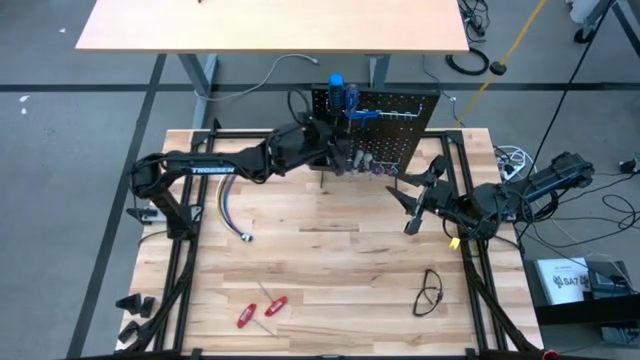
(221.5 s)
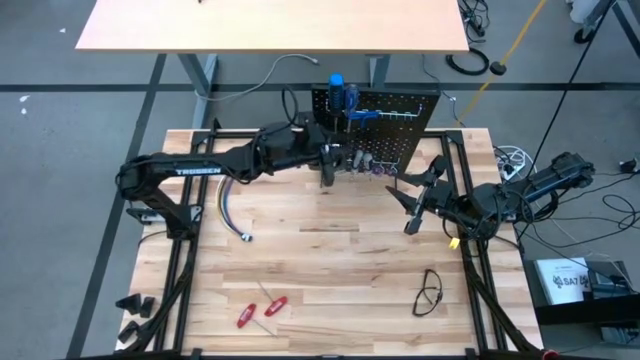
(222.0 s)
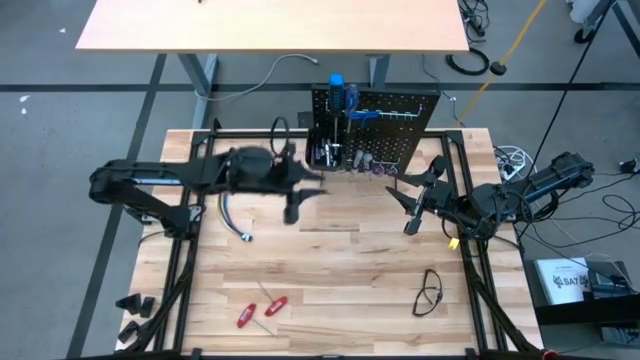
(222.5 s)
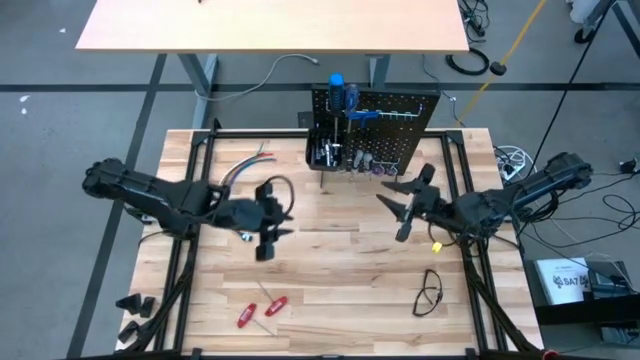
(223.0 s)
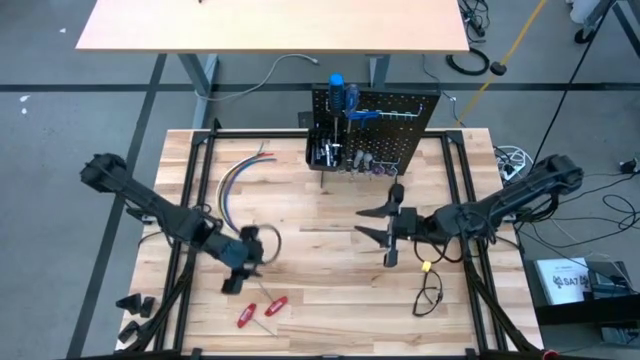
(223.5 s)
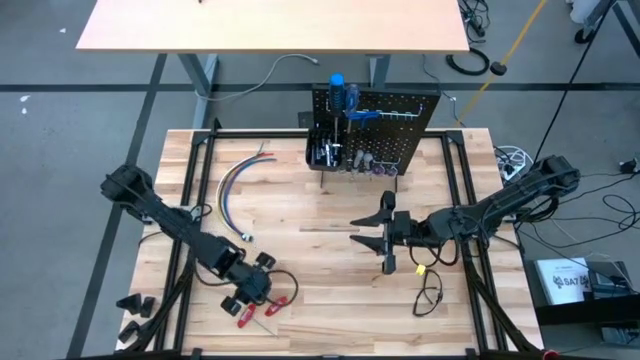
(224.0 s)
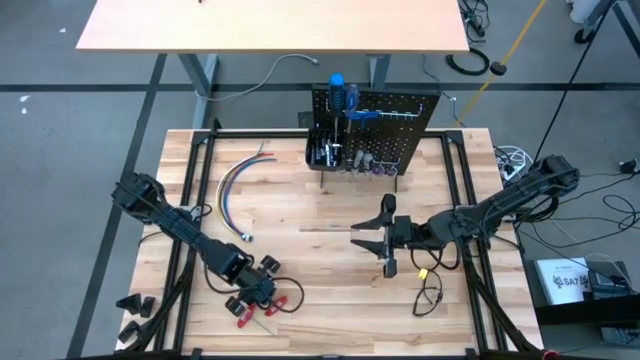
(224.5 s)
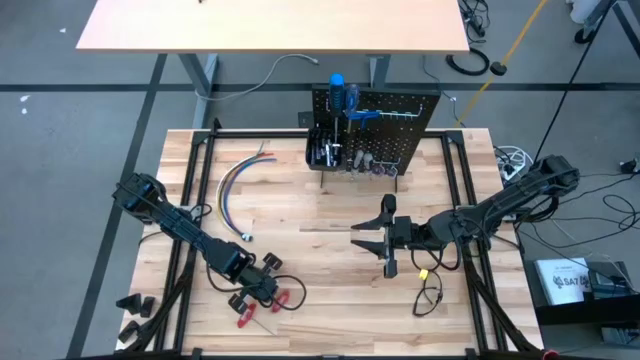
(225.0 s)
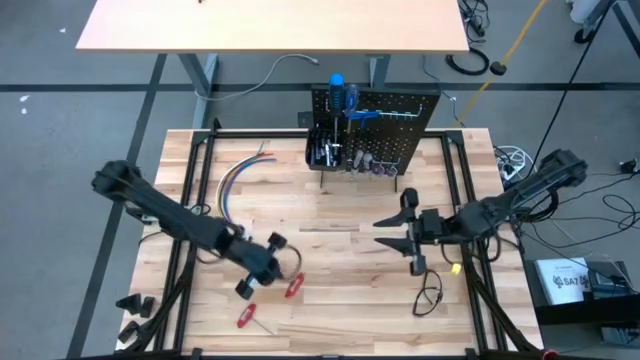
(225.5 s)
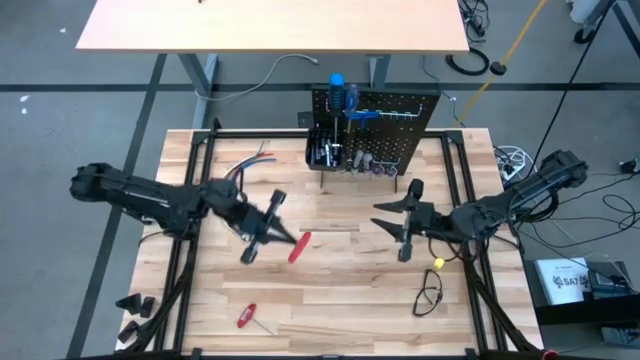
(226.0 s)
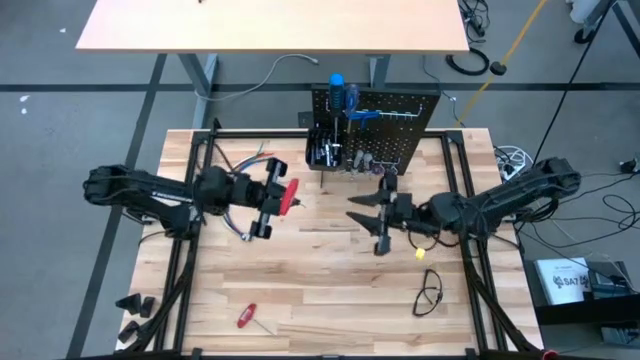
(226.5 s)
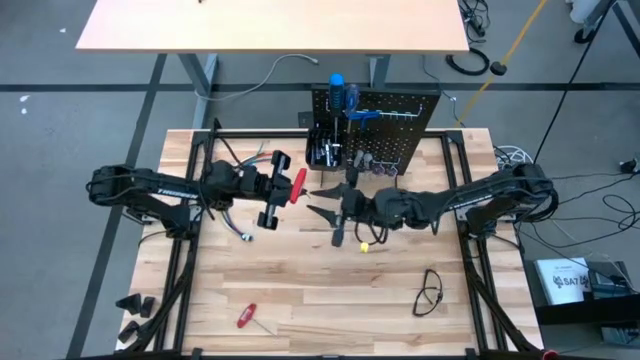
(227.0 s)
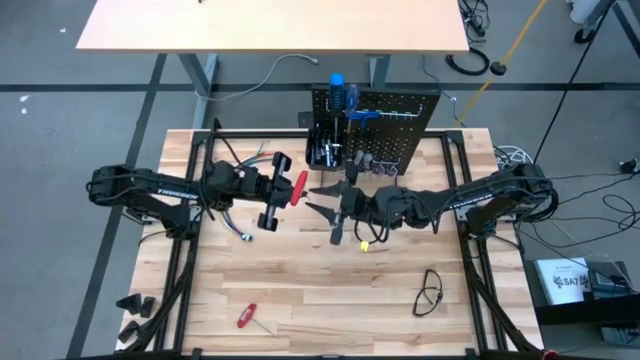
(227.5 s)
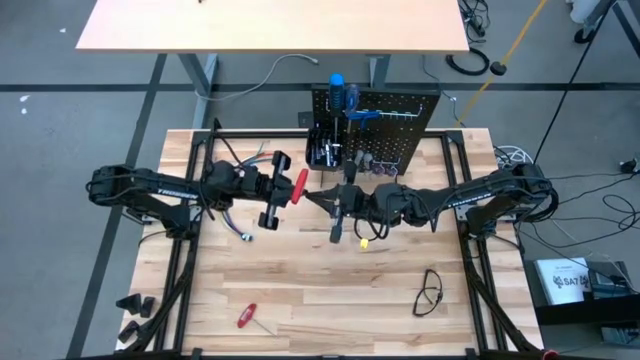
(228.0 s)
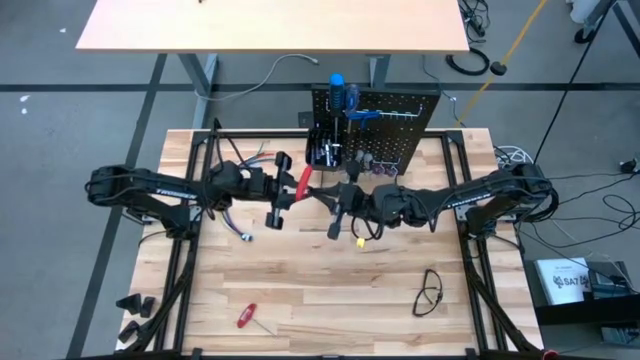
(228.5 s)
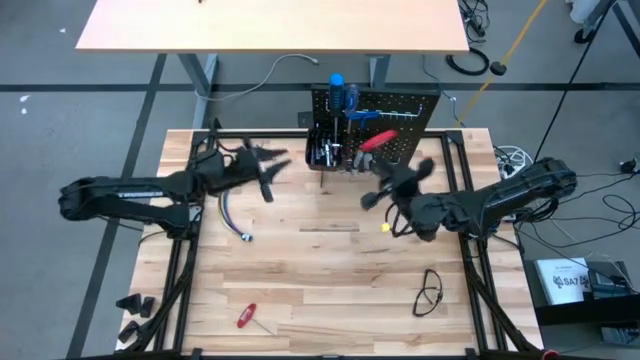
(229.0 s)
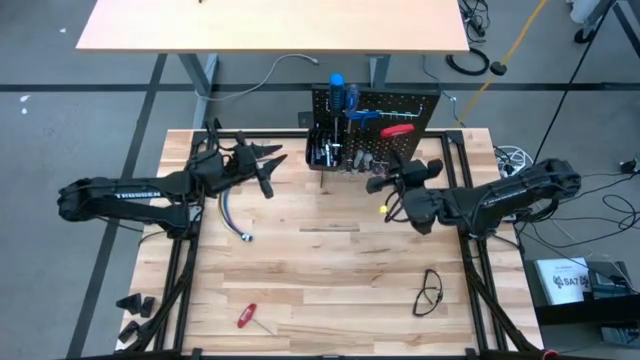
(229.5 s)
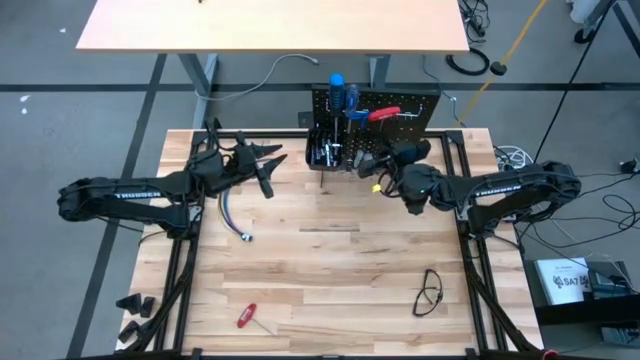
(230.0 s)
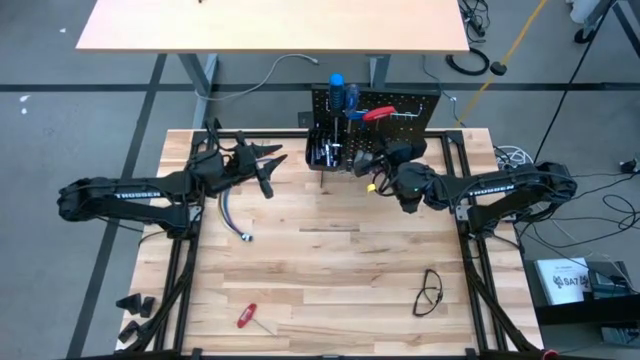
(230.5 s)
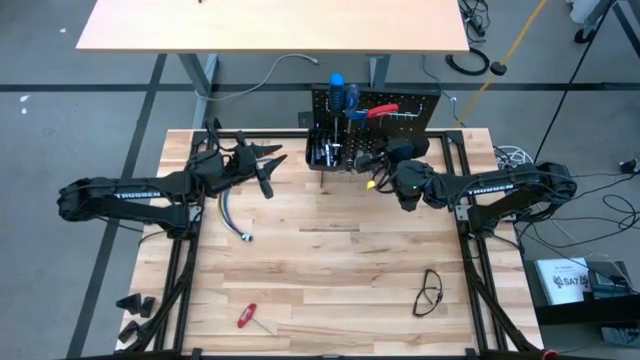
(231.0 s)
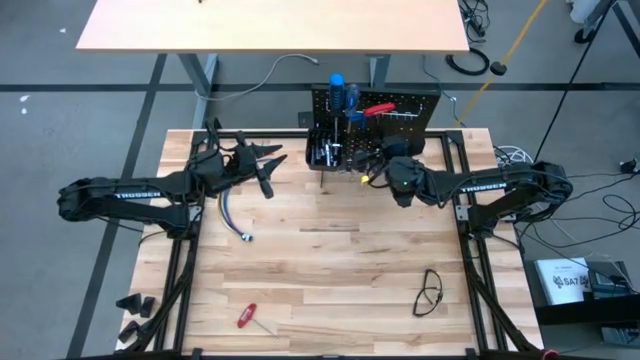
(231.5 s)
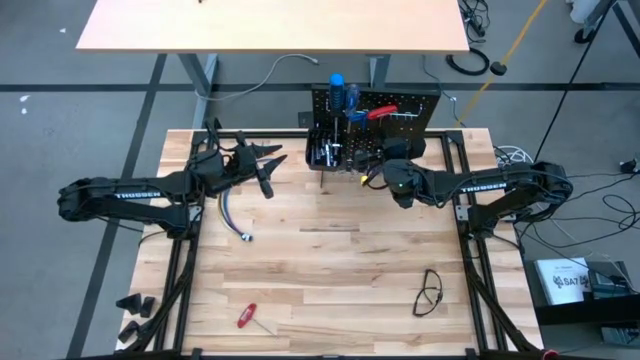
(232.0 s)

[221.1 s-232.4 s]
Task: Hang tools onto peg board
Hang the top red allen wrench on the peg board

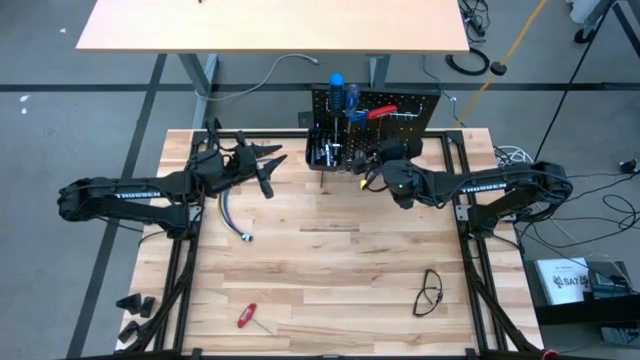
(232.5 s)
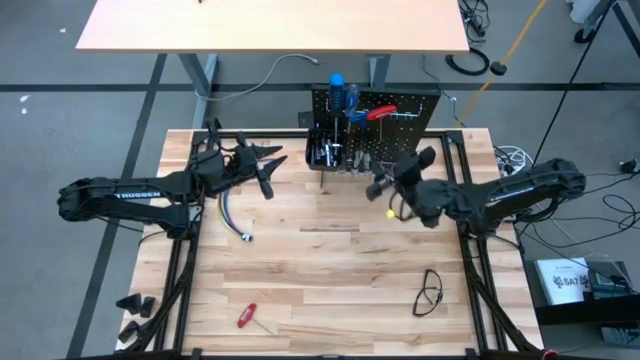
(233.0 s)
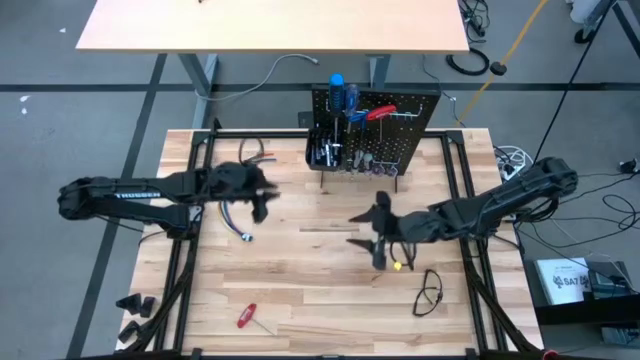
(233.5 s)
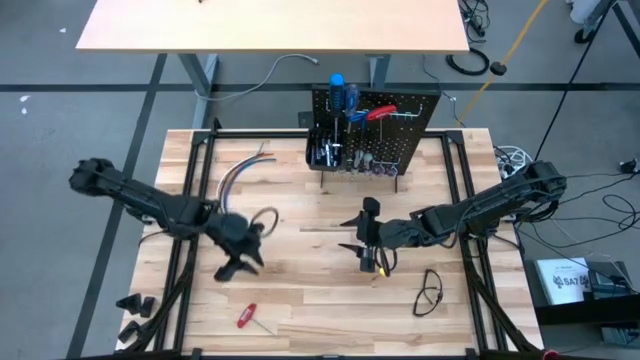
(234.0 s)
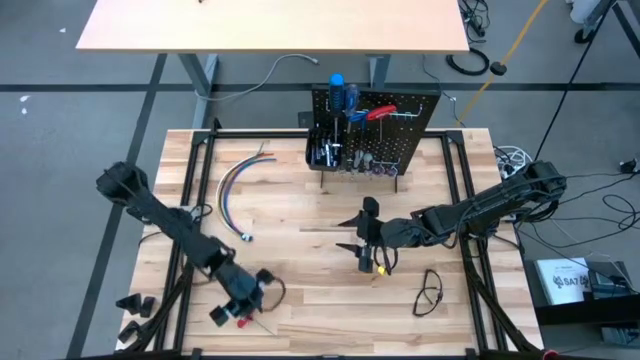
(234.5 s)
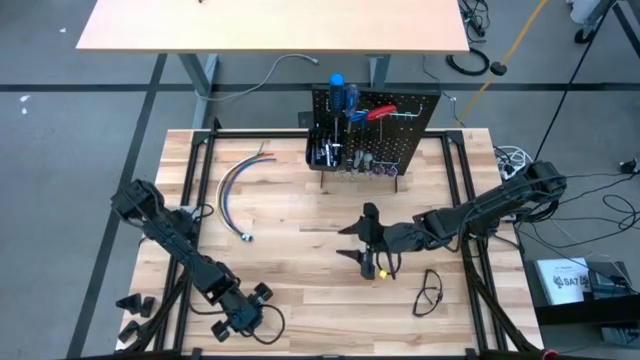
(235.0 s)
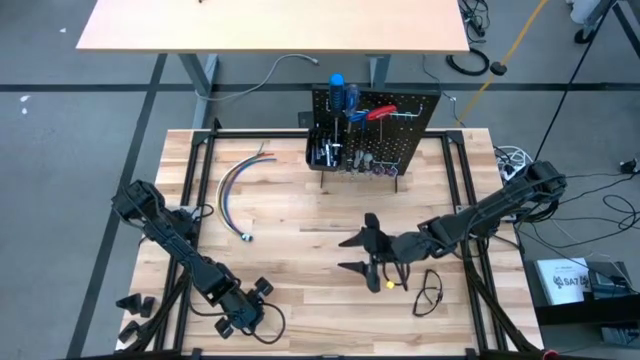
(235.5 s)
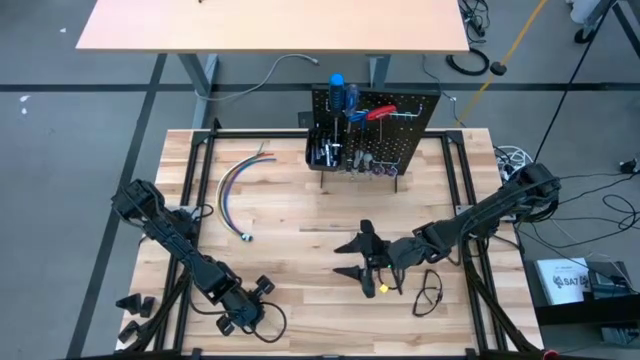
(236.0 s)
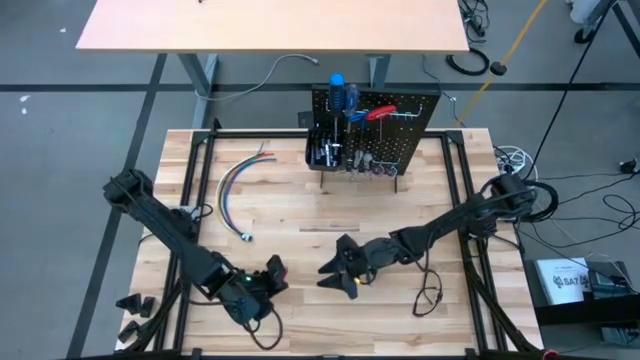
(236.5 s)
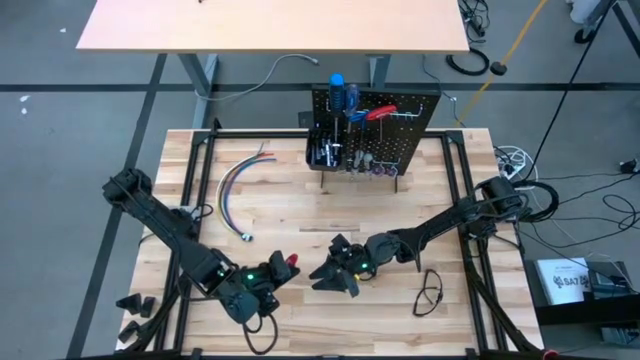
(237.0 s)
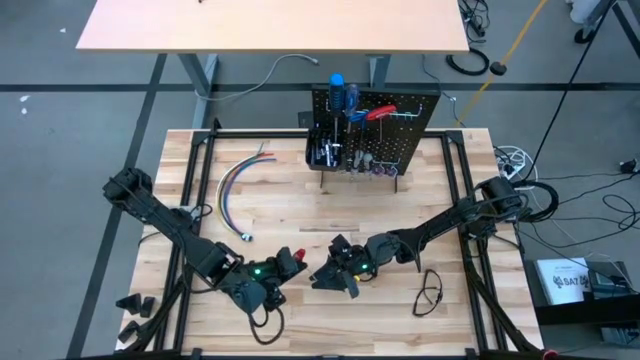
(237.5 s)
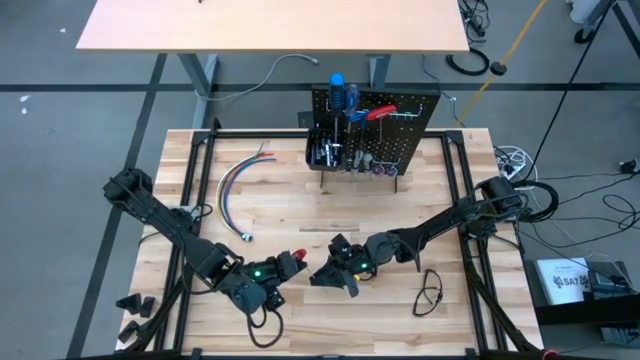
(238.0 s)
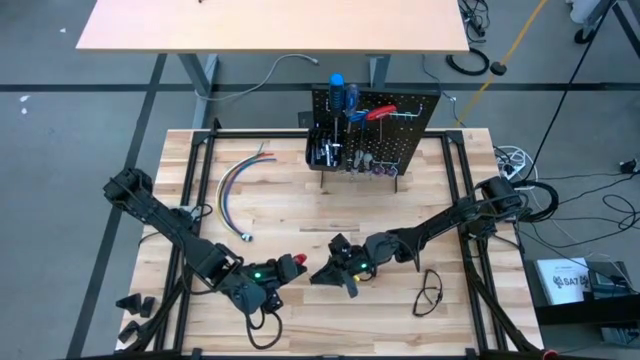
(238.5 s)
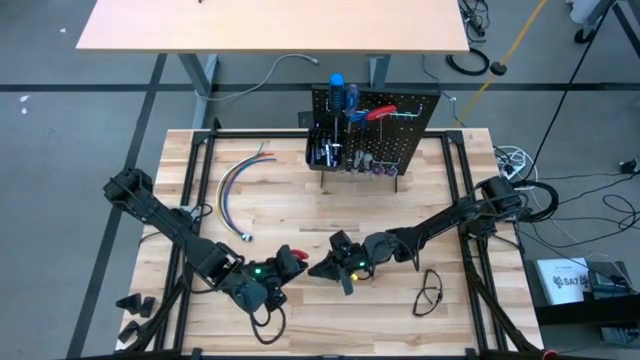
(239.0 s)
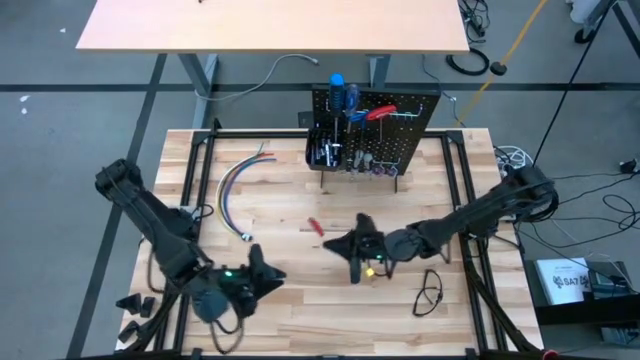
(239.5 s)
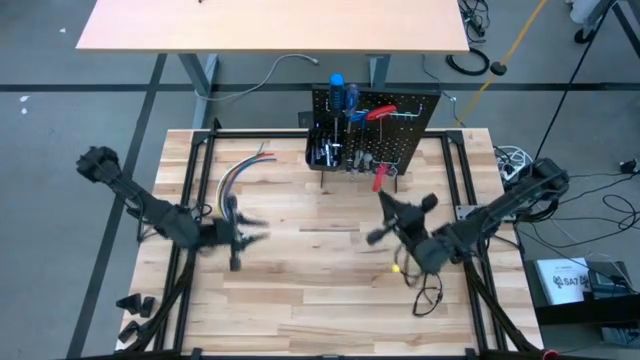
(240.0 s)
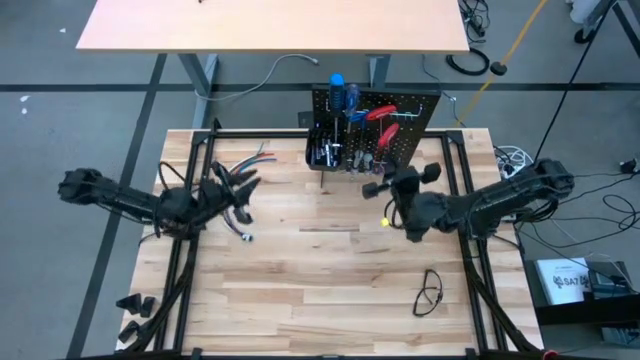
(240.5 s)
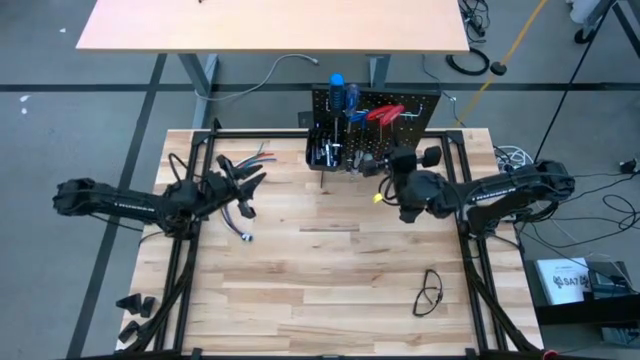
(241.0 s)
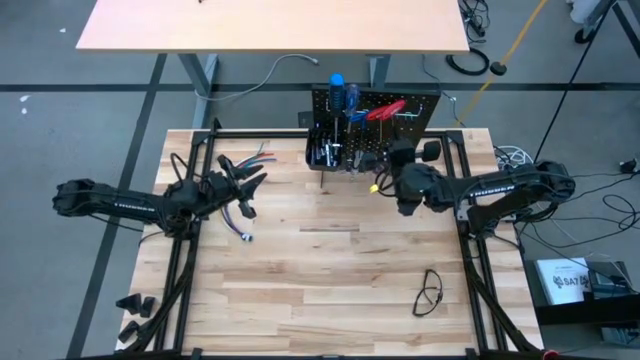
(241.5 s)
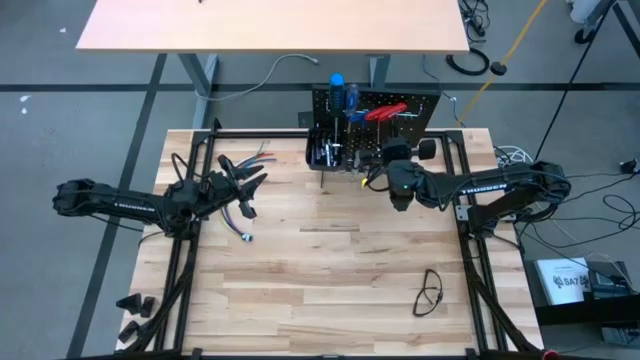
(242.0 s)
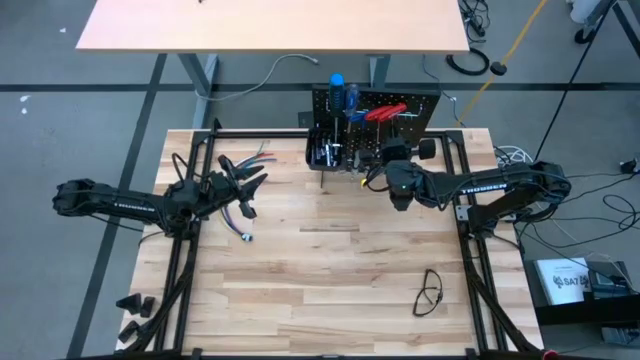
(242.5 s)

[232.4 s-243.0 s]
Hang the red allen wrench on the peg board
